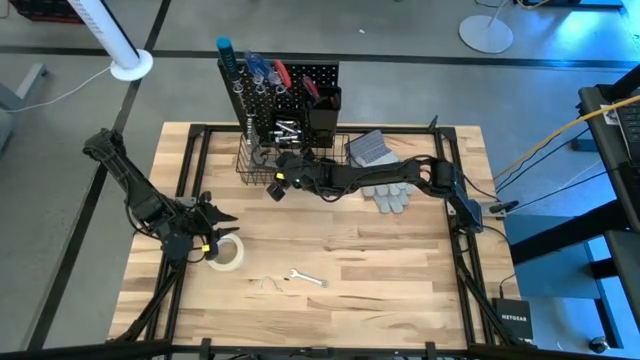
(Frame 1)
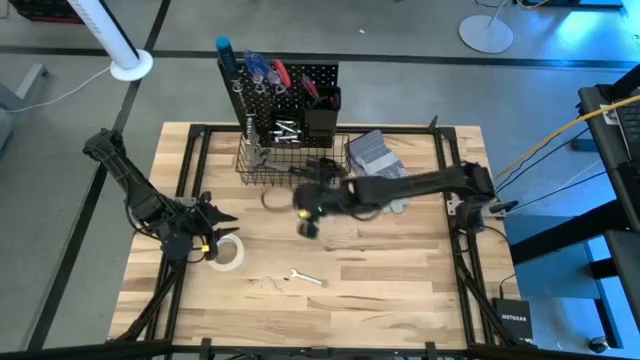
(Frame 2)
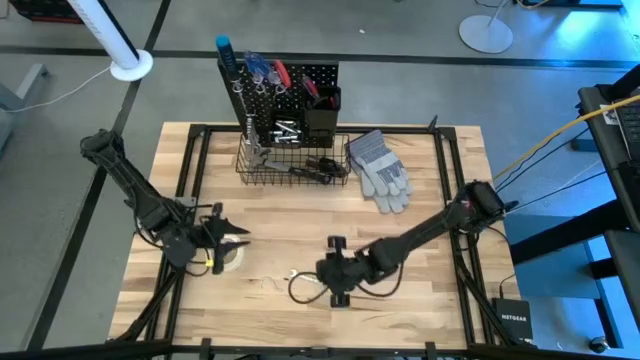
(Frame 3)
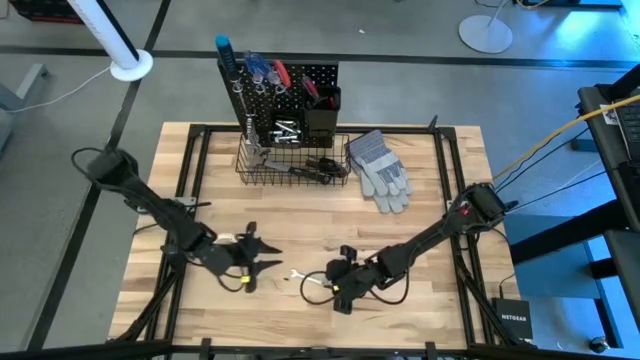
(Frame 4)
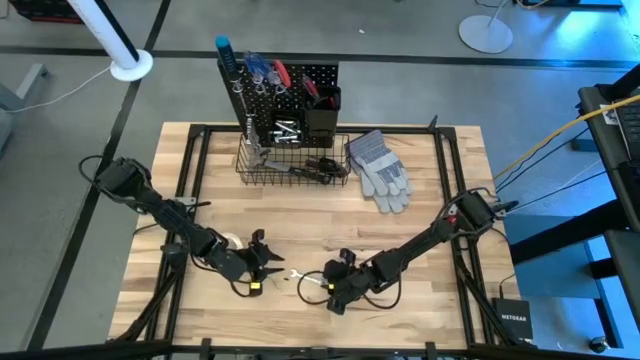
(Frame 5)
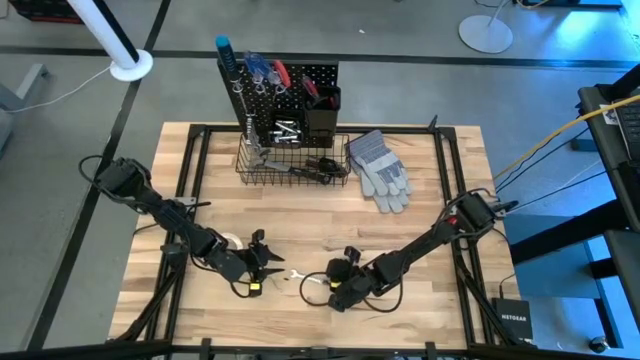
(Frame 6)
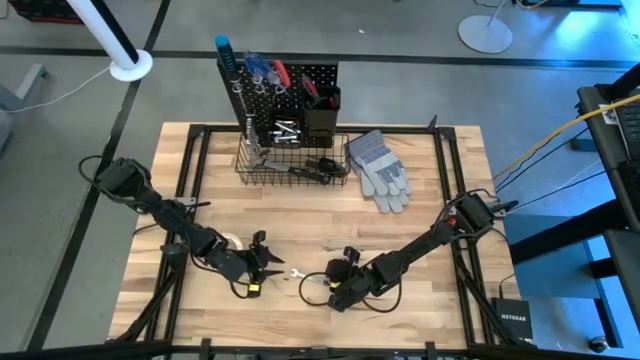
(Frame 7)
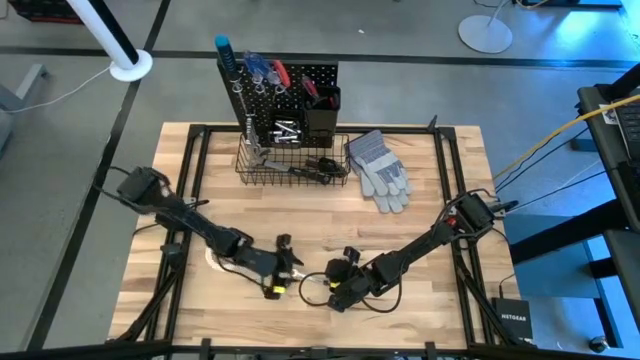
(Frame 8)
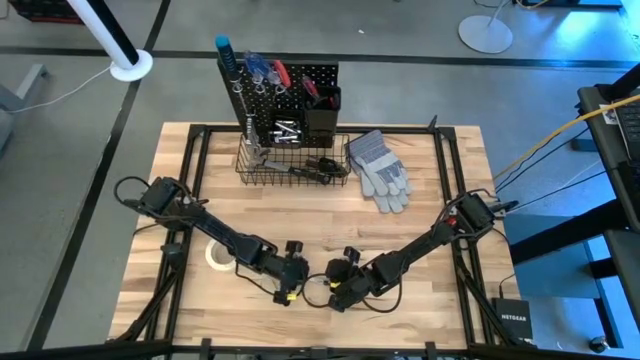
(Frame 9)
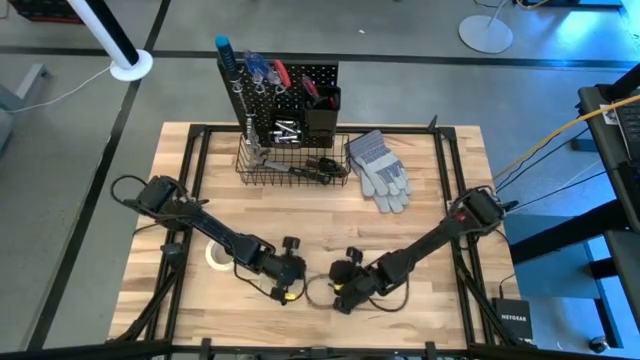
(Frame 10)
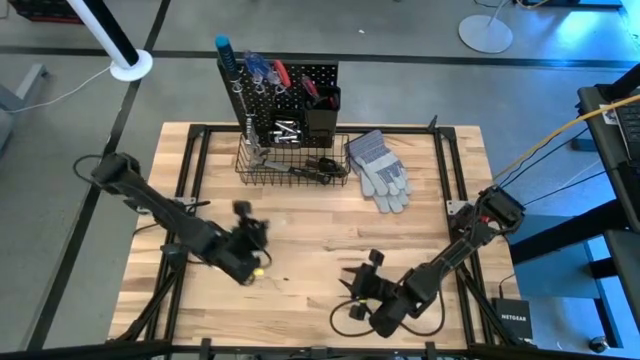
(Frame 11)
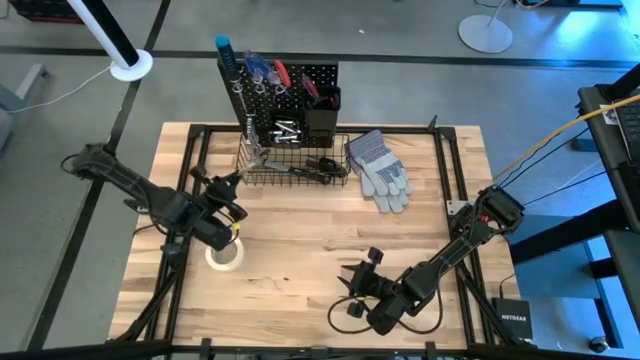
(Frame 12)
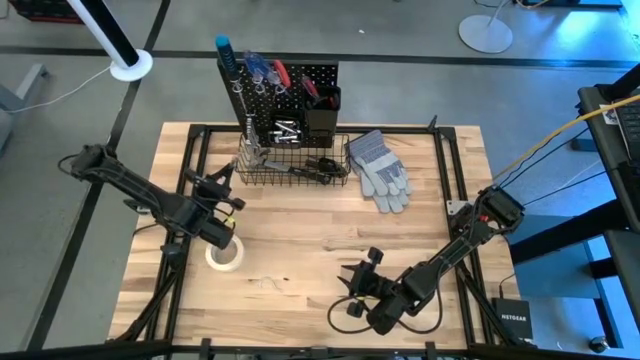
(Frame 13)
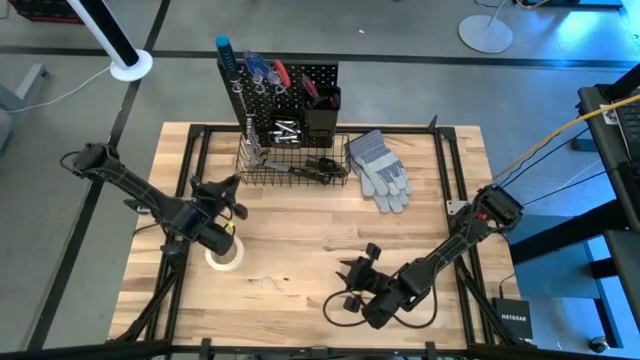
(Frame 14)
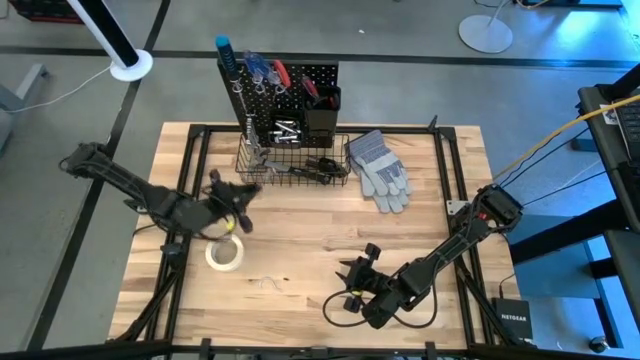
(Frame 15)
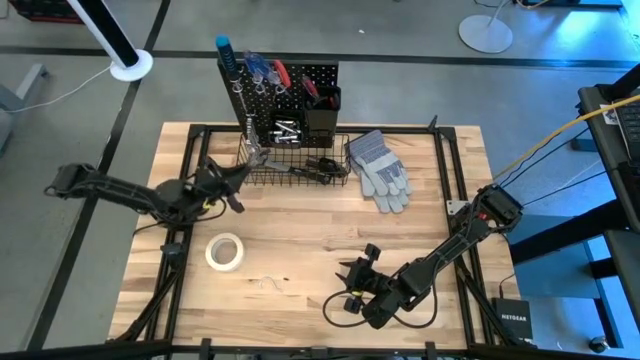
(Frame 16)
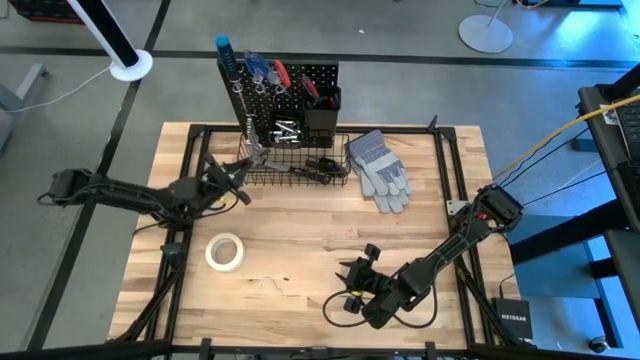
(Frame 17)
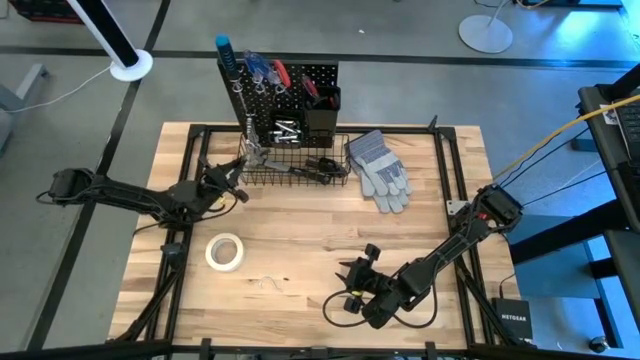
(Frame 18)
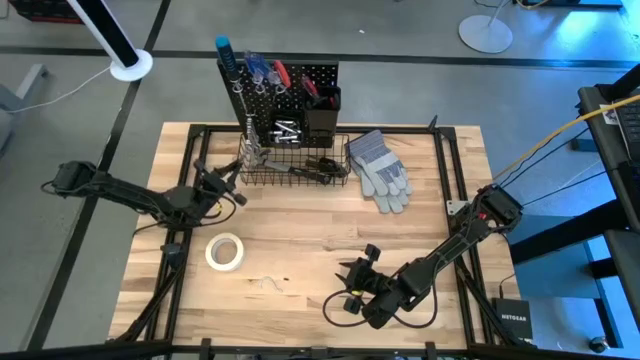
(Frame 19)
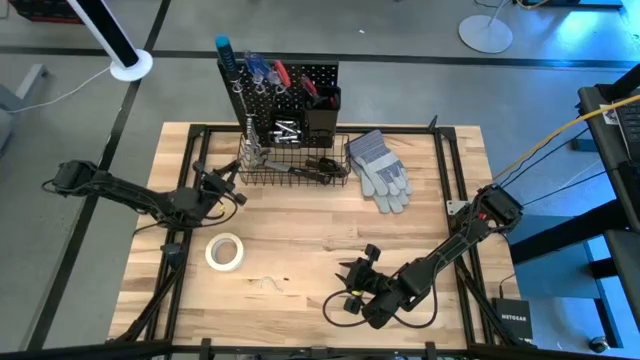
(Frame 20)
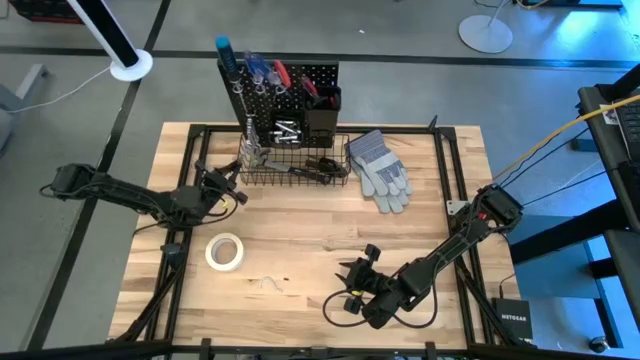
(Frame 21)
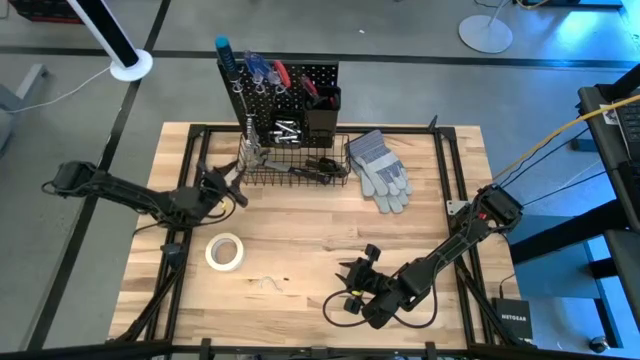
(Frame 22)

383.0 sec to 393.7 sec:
Task: Hang tools onto peg board
Hang the wrench on the peg board

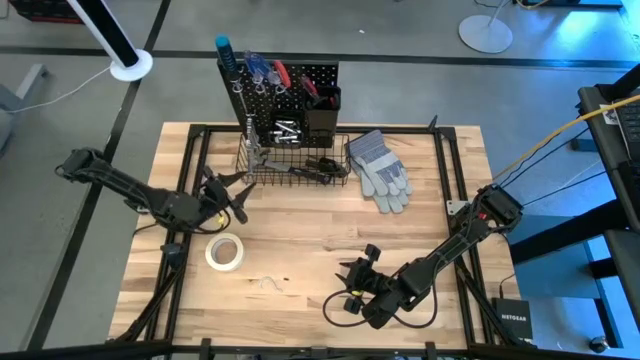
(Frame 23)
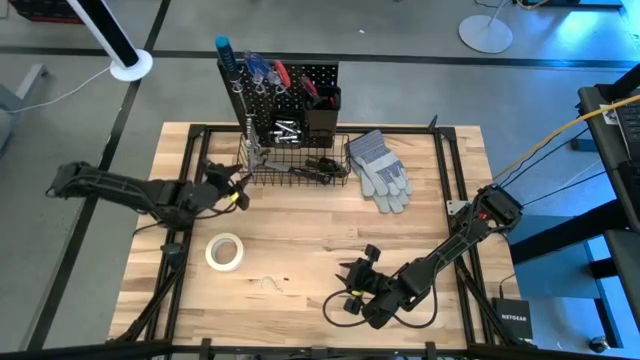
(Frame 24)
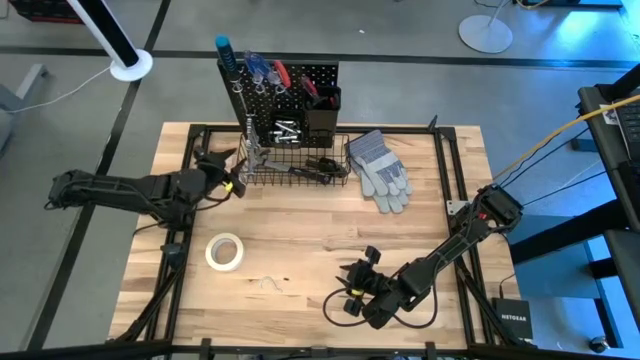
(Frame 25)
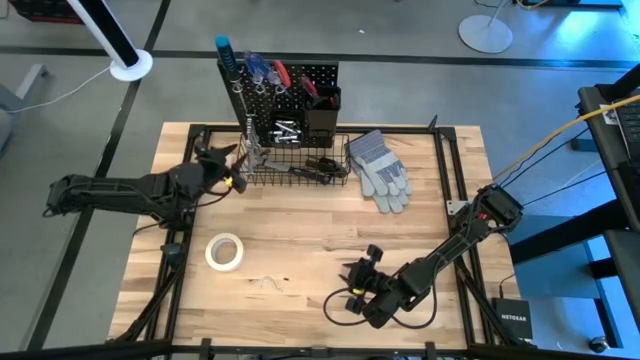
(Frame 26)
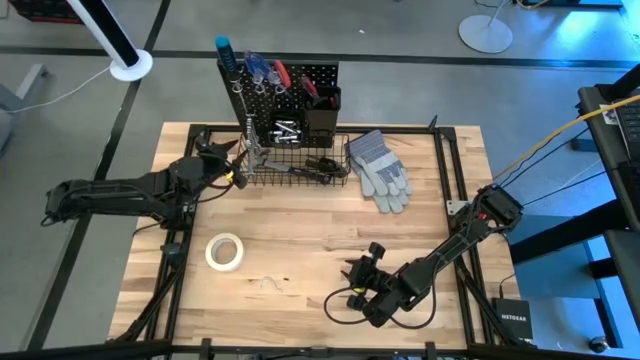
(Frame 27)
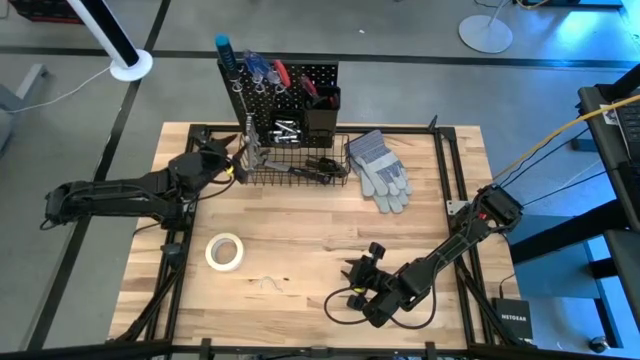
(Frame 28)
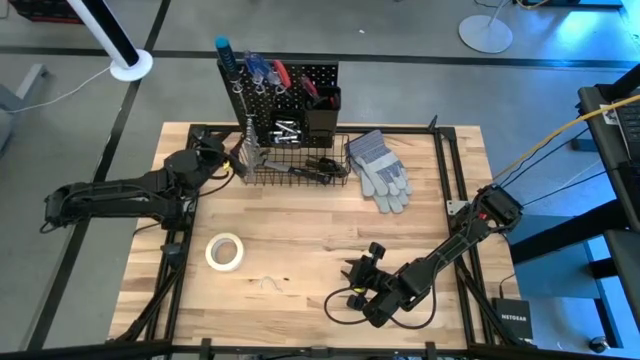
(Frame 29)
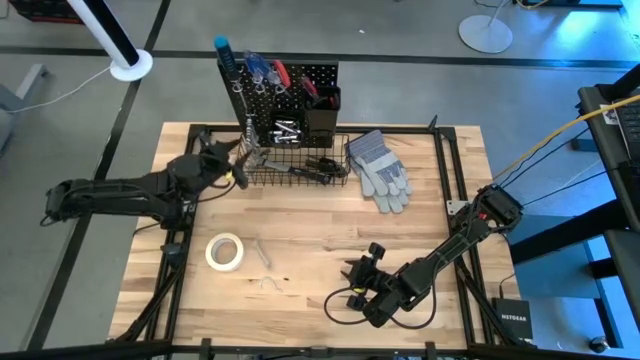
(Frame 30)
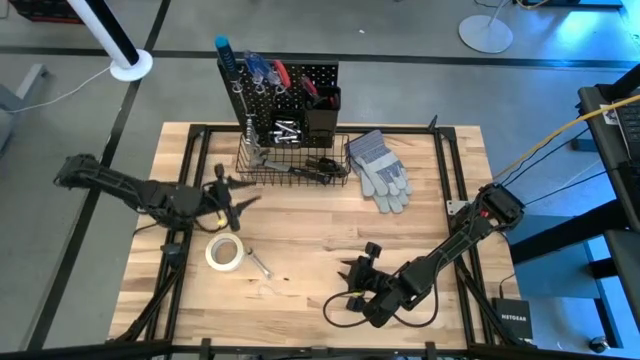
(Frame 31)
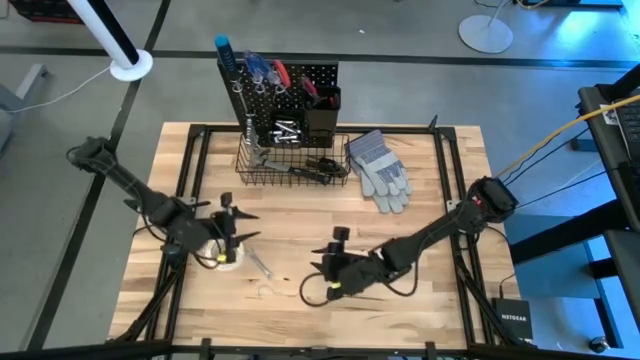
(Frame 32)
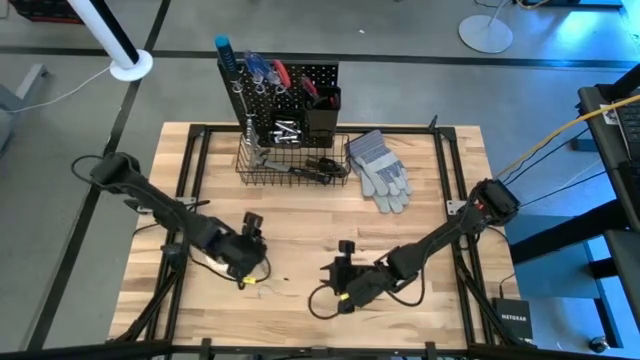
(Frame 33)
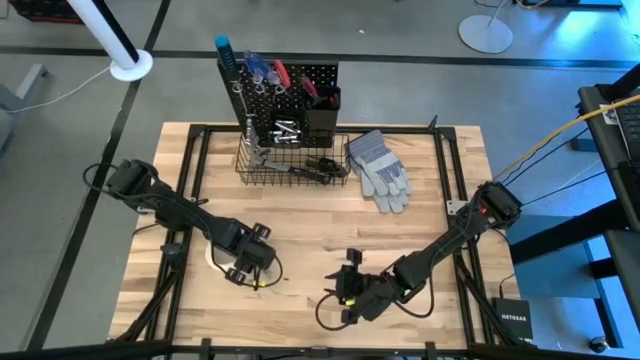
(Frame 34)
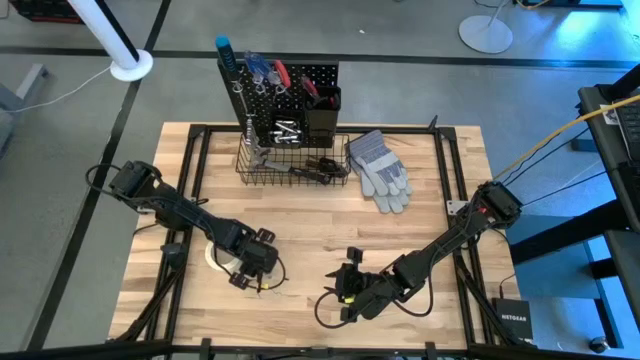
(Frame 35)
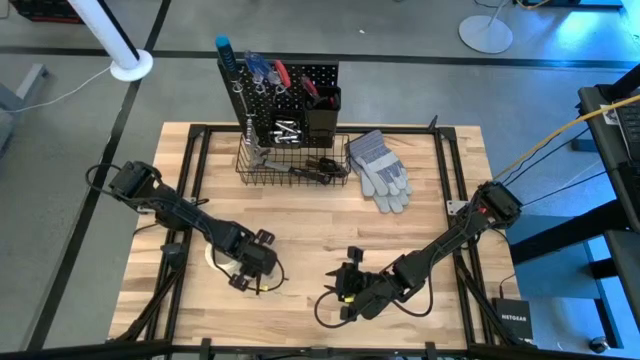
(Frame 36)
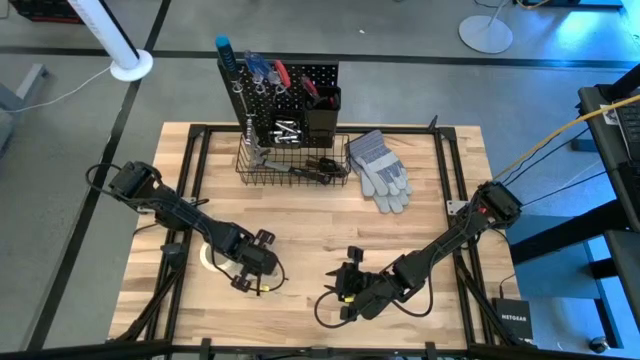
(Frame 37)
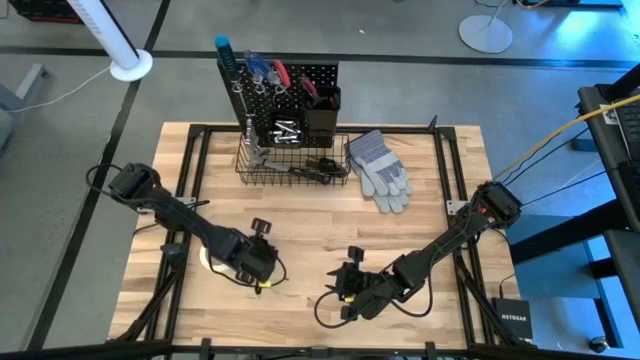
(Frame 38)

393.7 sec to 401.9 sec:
Hang the wrench on the peg board

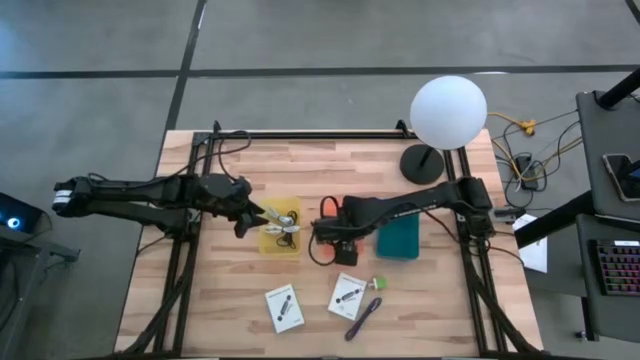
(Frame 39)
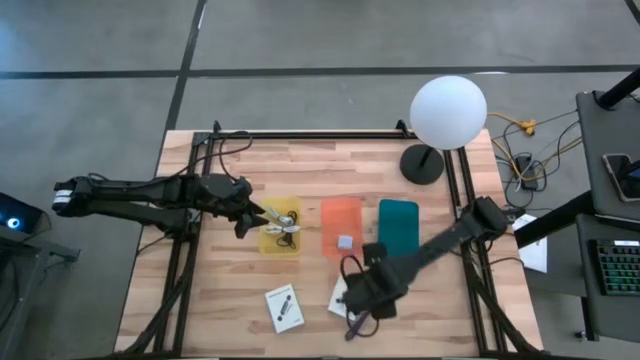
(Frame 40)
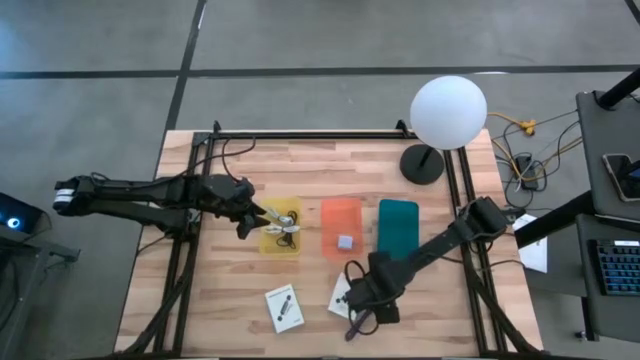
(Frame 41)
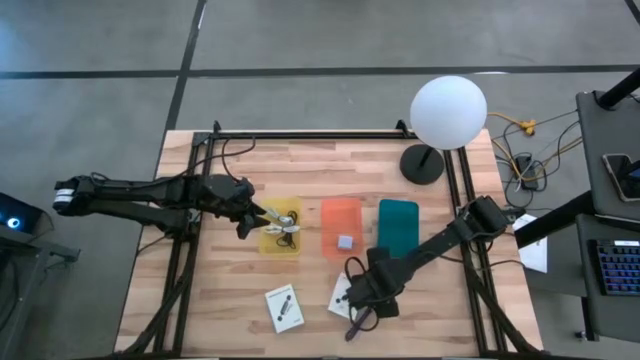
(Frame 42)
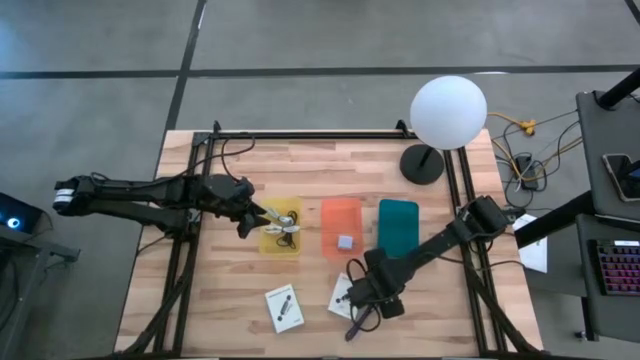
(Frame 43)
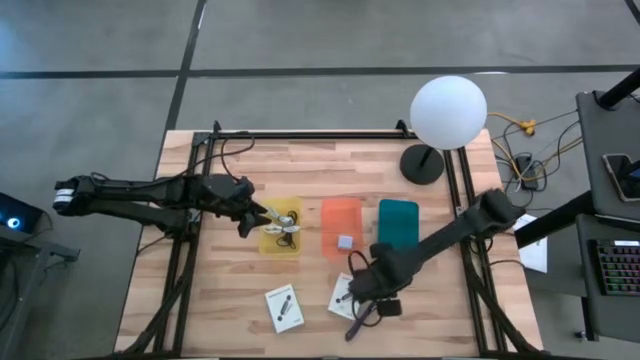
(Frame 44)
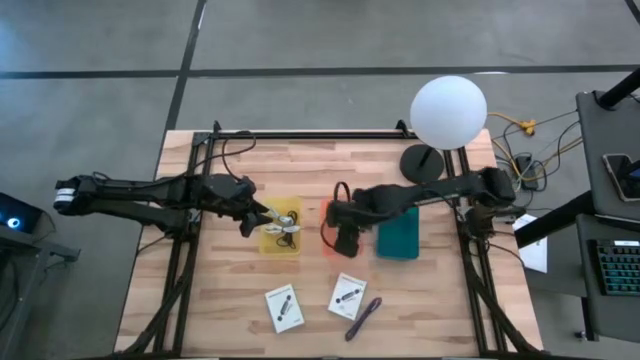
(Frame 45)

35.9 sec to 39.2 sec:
Task: Pick and place items into bin
Put the green USB adapter box into the orange bin
